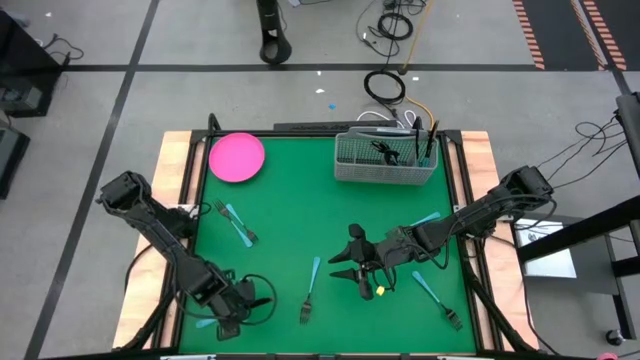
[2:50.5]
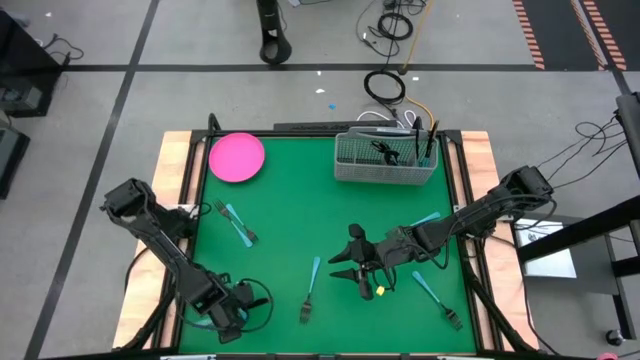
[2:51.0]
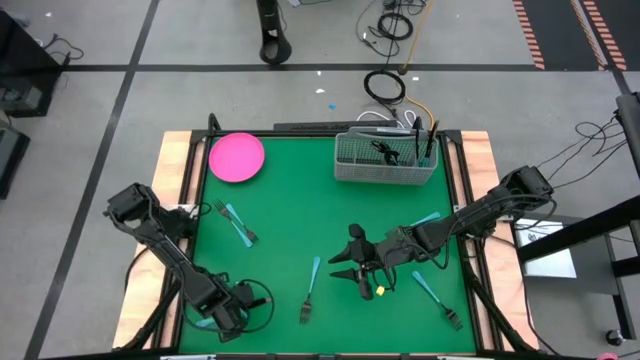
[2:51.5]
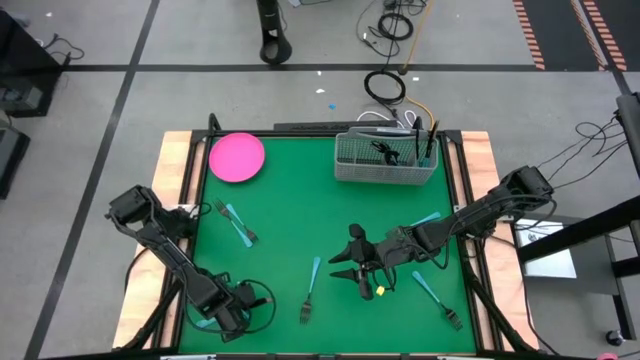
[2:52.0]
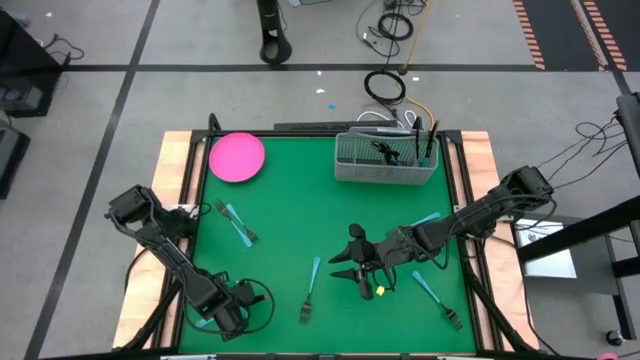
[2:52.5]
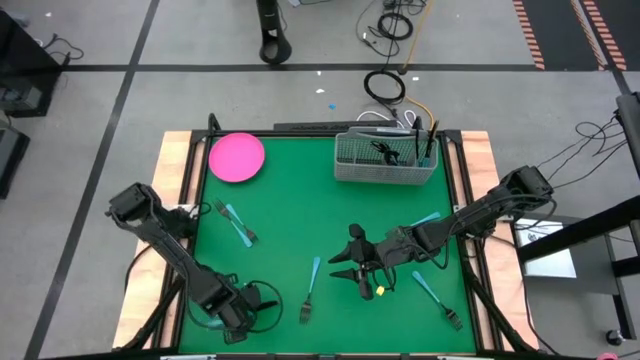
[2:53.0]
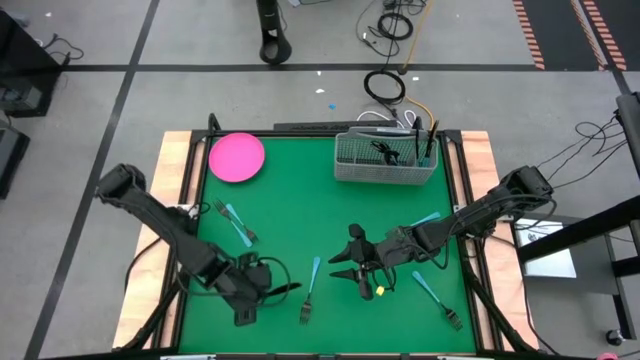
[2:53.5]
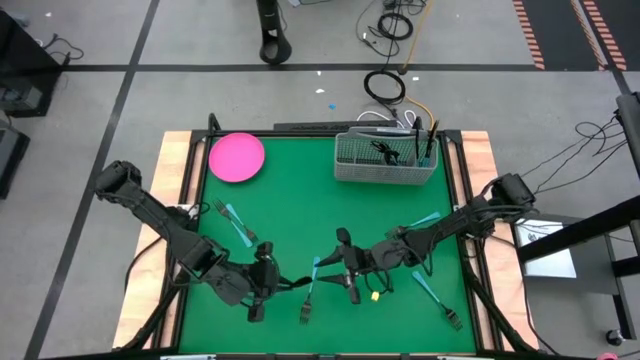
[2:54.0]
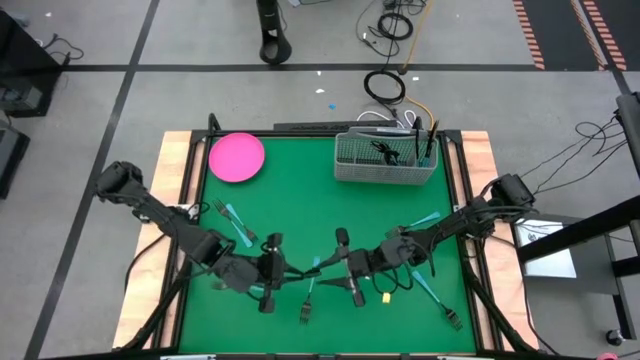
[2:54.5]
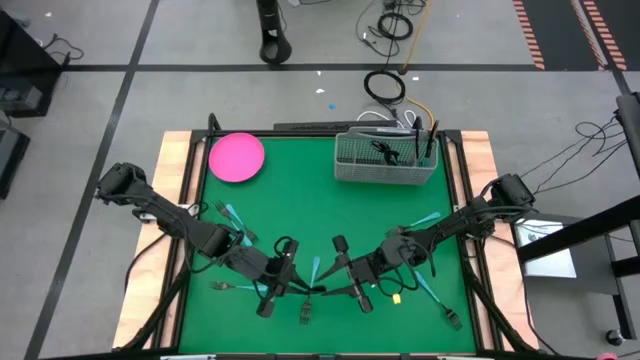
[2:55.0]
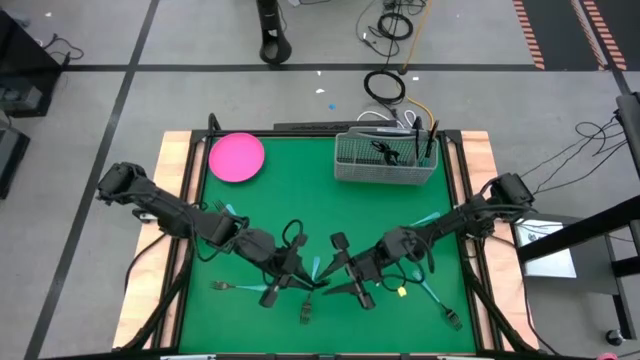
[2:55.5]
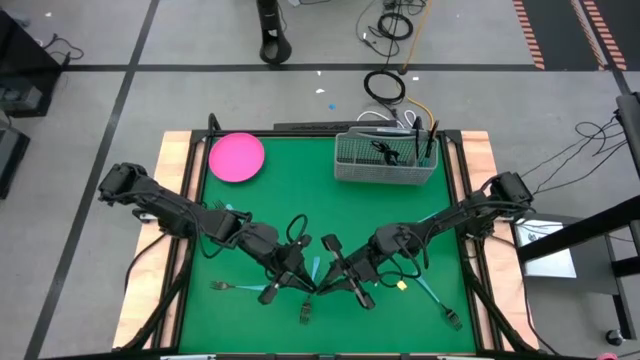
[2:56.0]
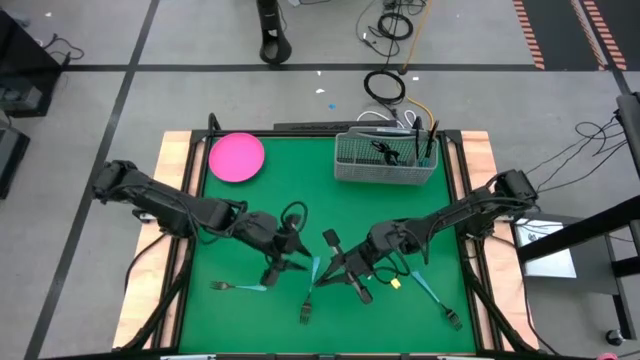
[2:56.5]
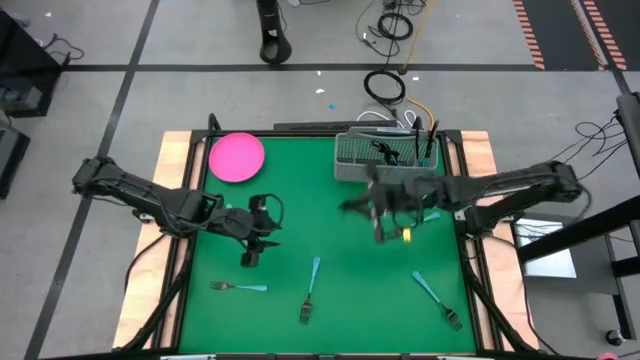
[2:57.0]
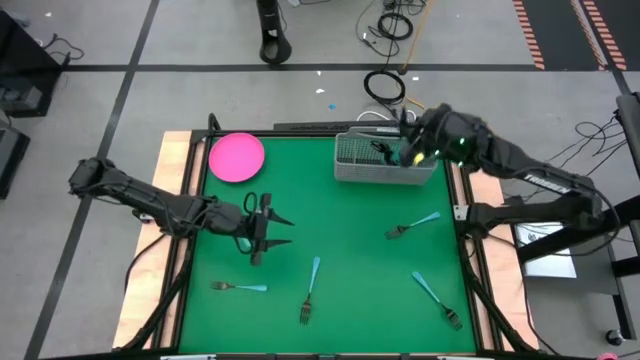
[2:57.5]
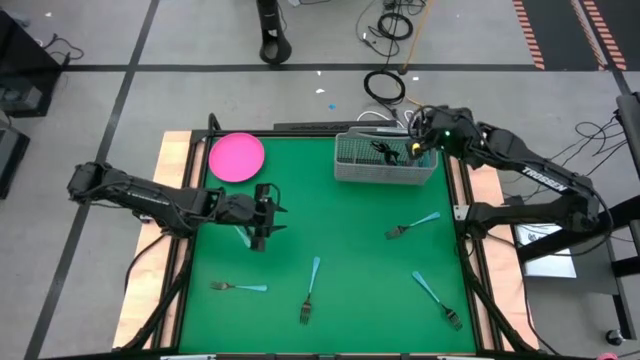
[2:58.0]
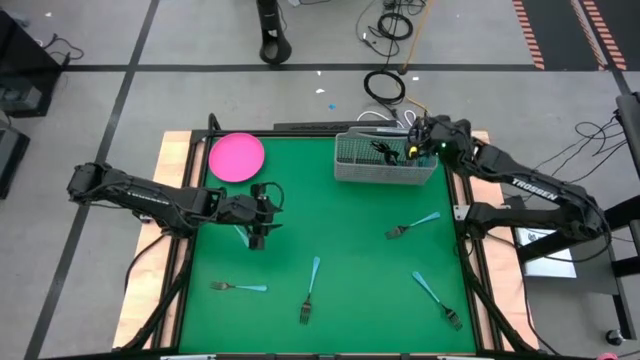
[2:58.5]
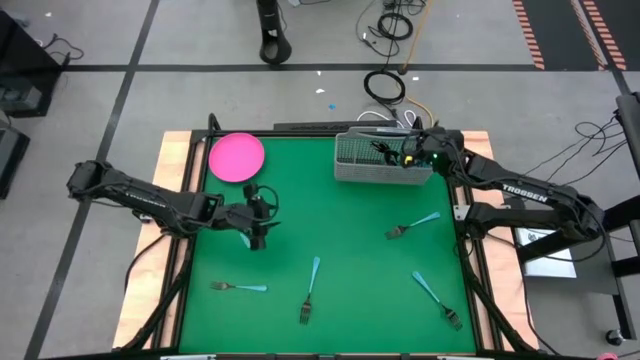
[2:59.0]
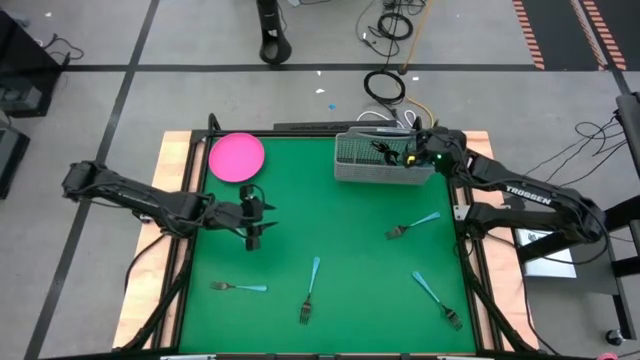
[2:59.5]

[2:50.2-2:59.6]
Task: Sort silverware
Put the black knife into the cutlery rack with the other black knives

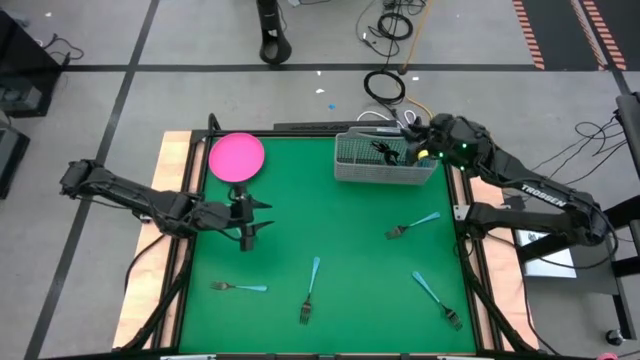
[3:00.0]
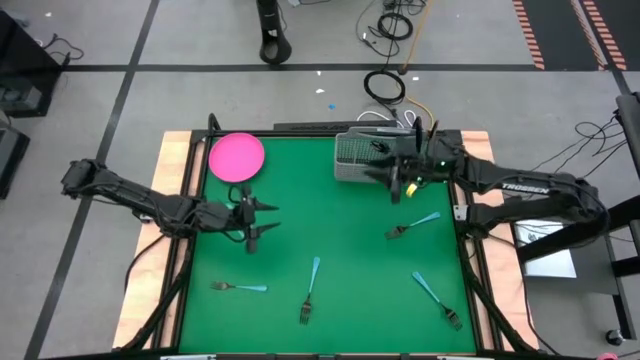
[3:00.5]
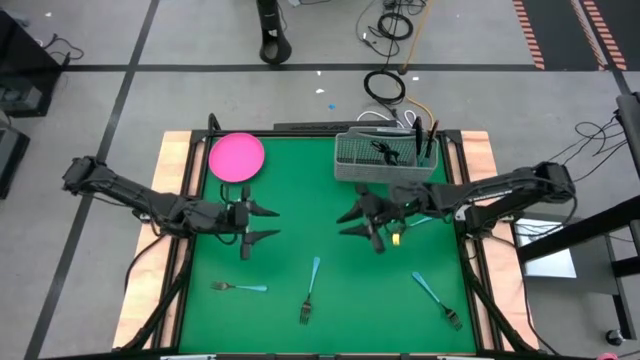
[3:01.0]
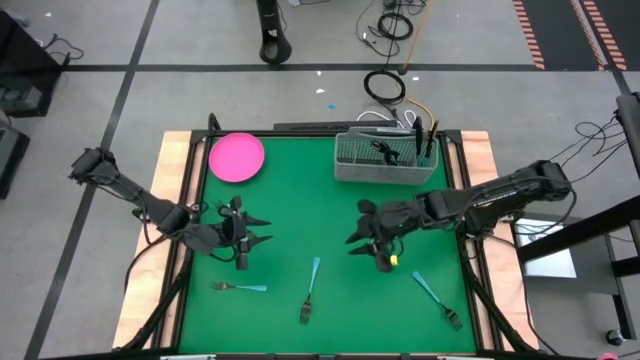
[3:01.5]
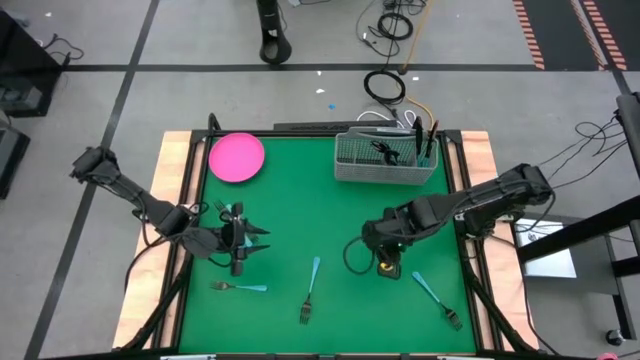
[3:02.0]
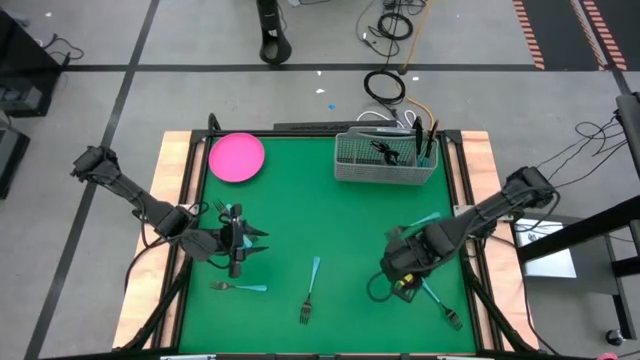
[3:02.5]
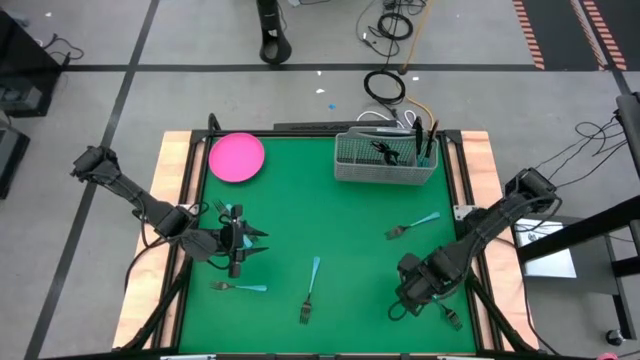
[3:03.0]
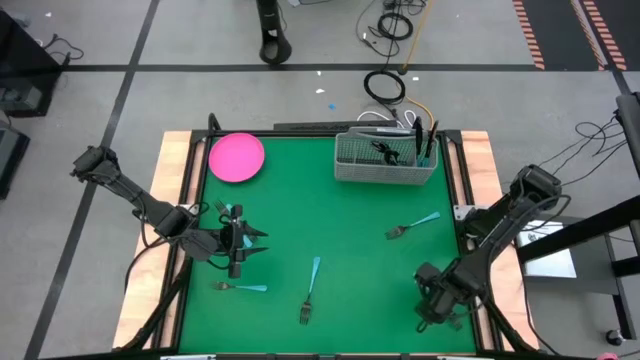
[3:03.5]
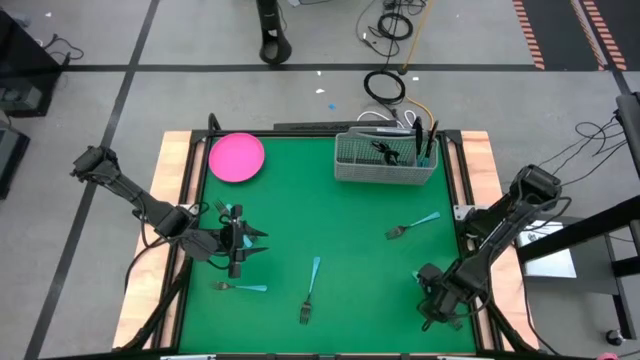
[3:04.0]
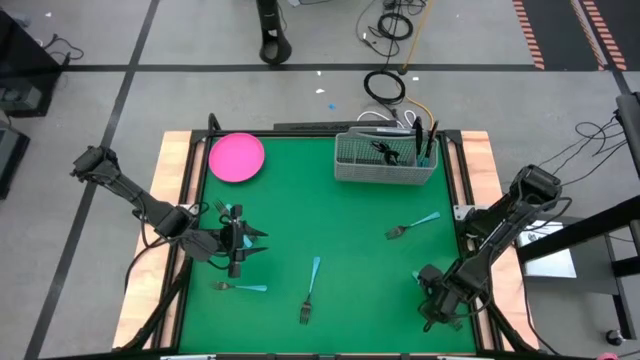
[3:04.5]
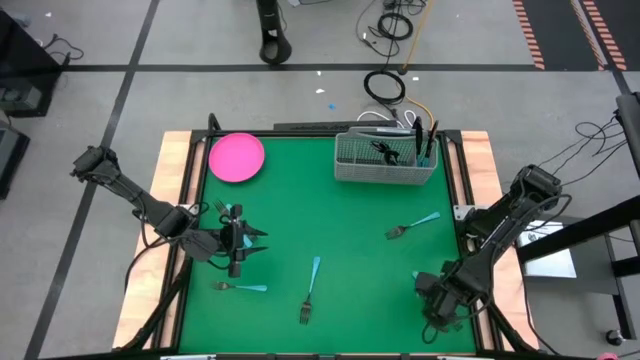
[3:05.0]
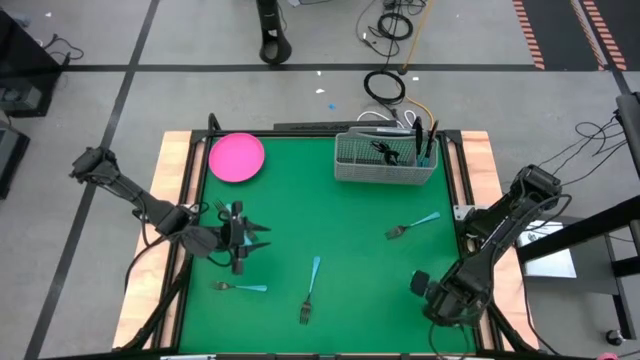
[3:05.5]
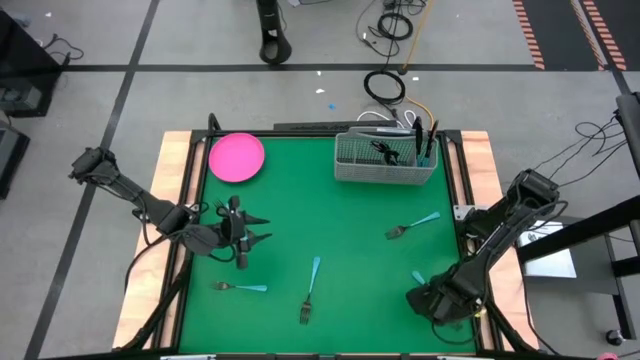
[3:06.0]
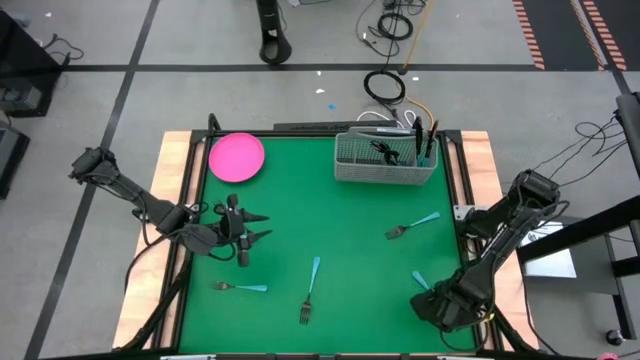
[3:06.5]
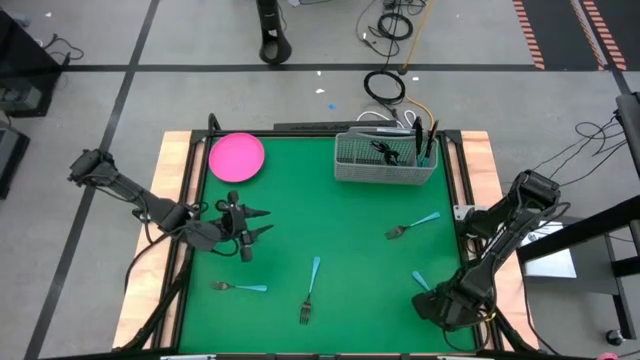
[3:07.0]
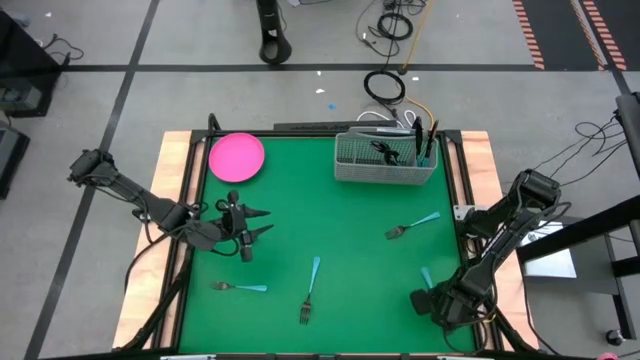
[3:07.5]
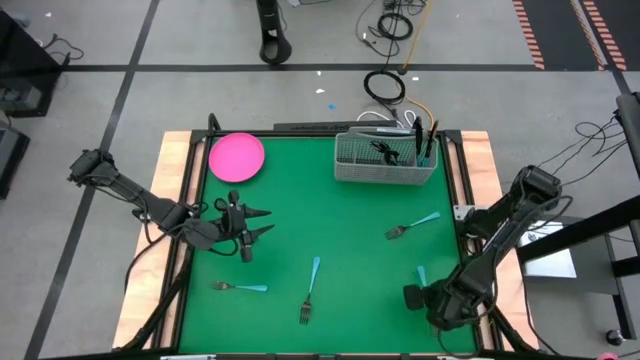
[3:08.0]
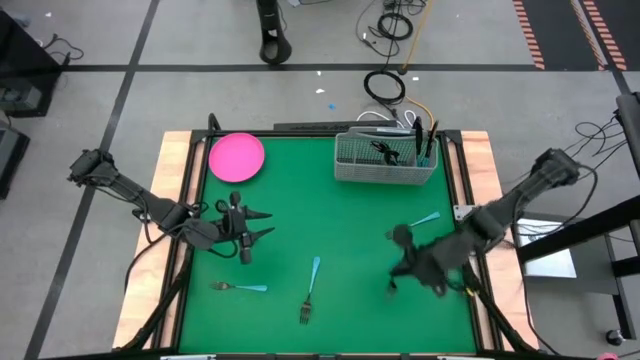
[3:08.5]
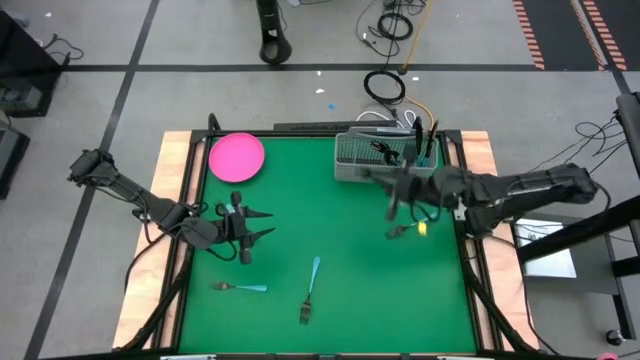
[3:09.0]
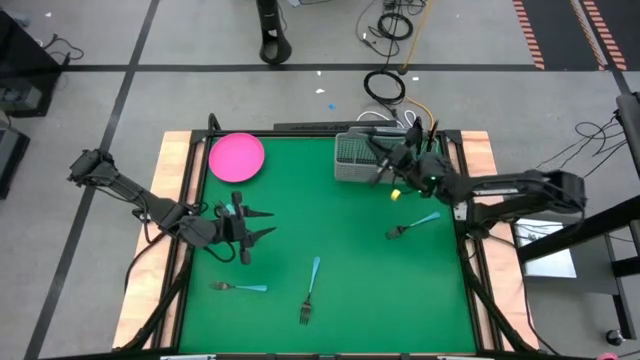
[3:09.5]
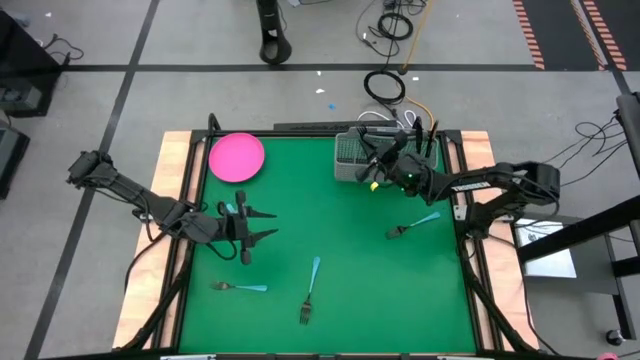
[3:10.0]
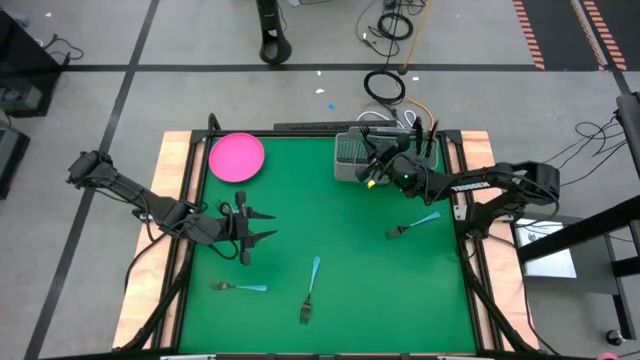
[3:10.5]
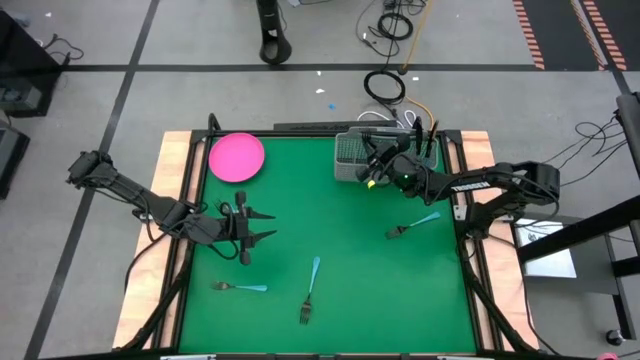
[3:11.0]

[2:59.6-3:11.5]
Put the bottom right black fork into the cutlery rack

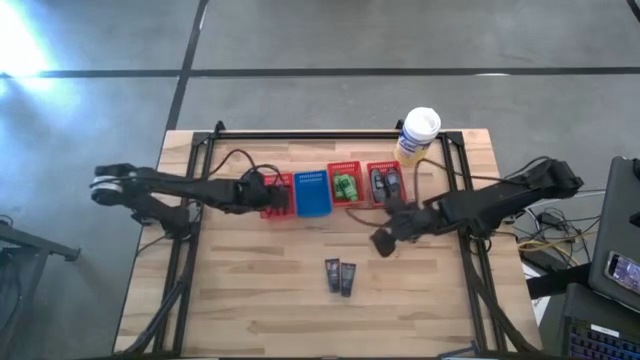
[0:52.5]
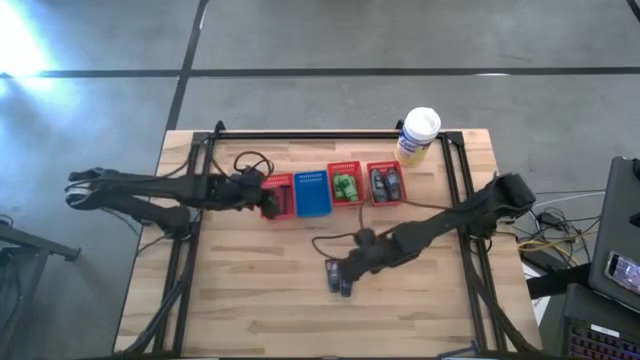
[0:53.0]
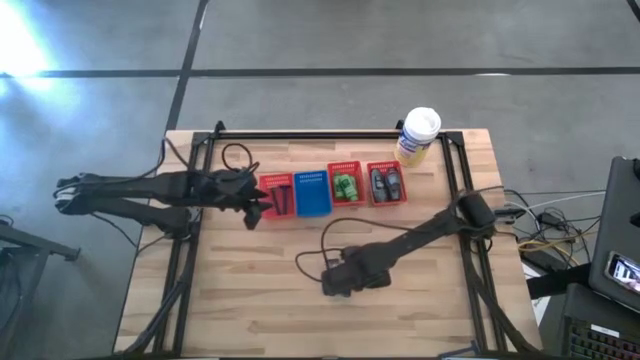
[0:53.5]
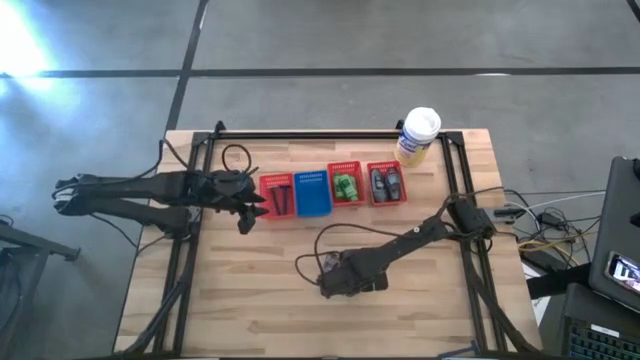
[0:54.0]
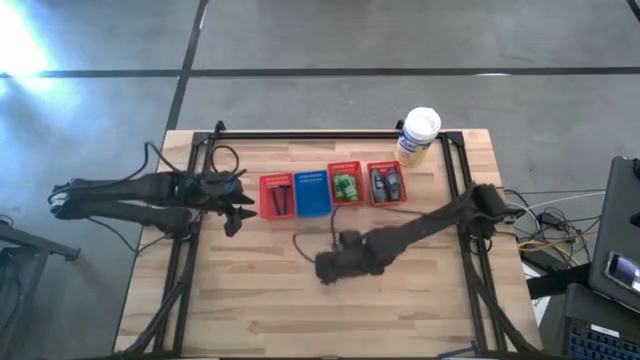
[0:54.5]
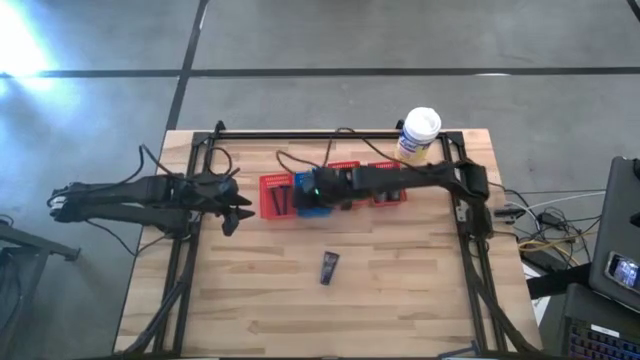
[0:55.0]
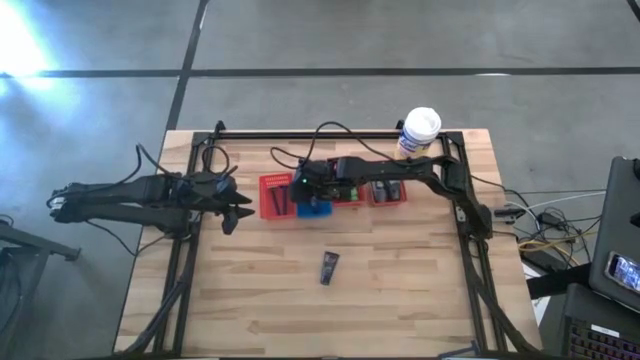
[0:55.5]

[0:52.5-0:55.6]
Task: Pick & Place Travel size toiletries
Put the blue shave cream into the blue bin
